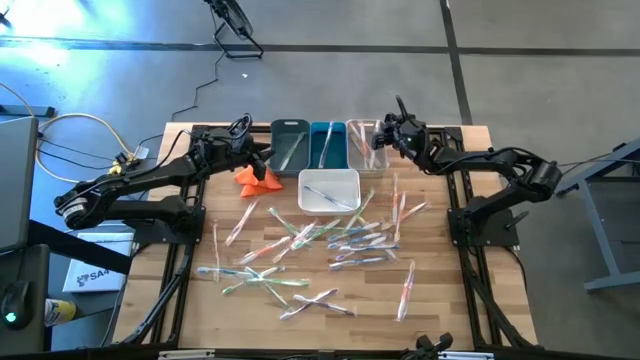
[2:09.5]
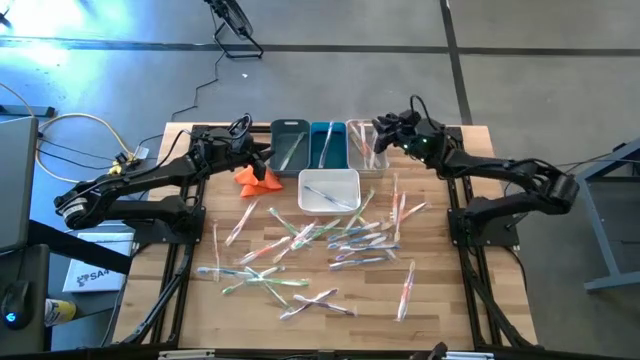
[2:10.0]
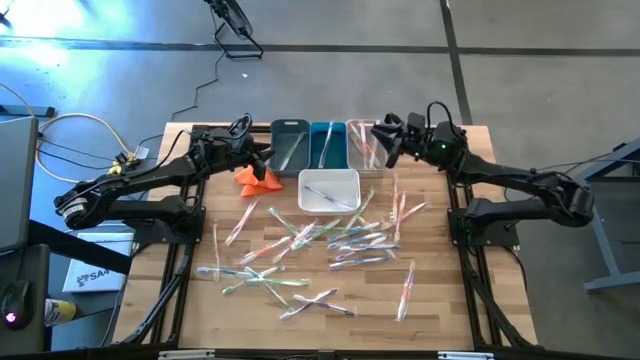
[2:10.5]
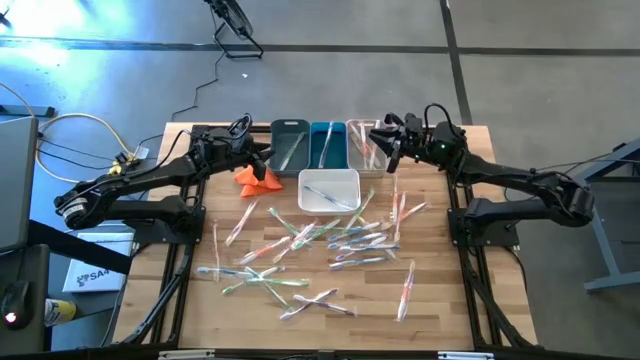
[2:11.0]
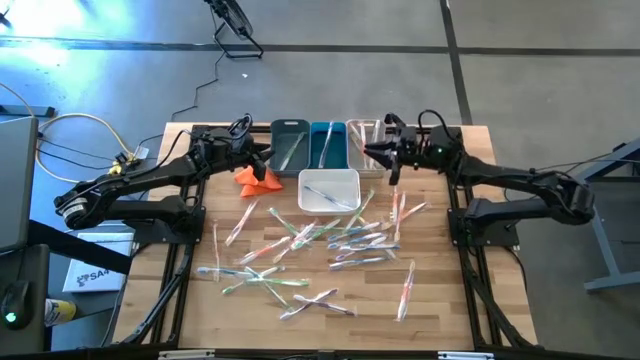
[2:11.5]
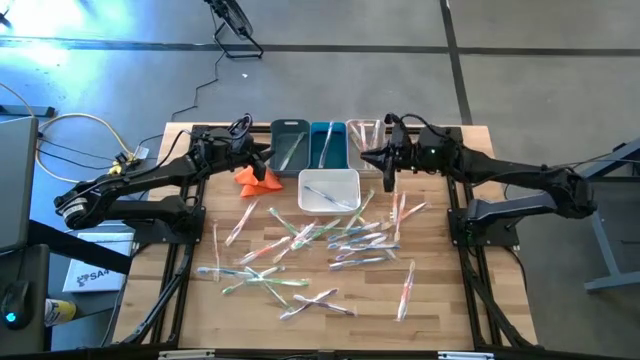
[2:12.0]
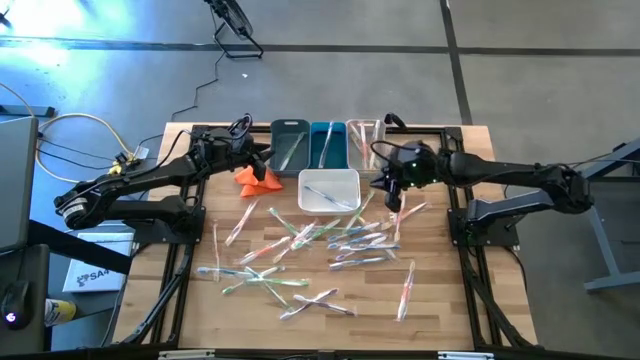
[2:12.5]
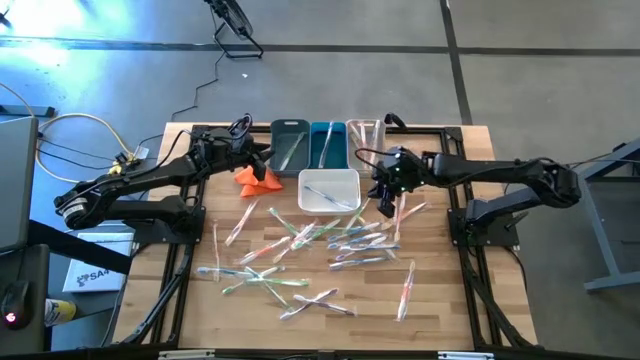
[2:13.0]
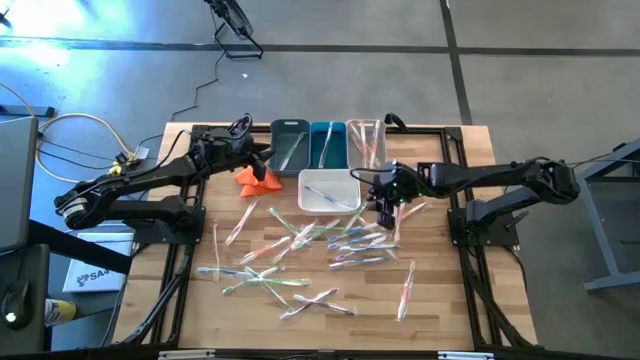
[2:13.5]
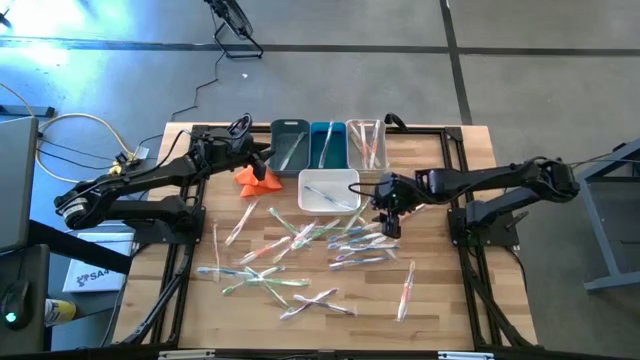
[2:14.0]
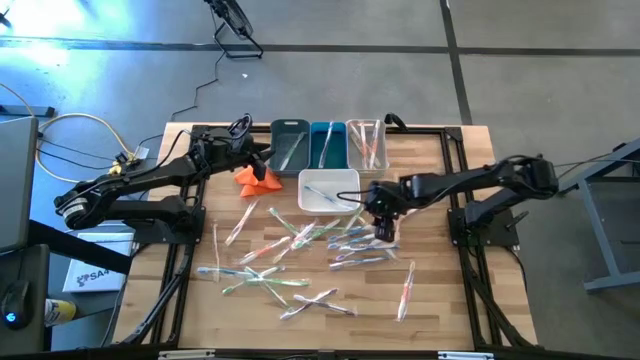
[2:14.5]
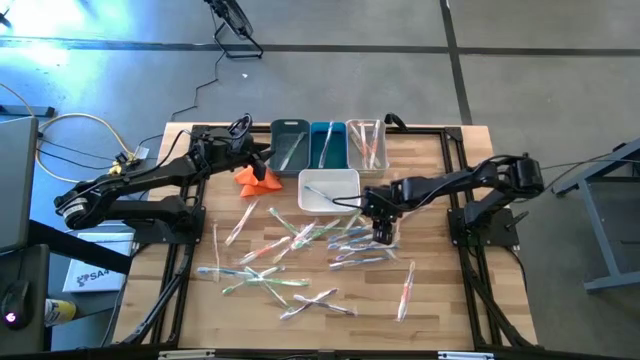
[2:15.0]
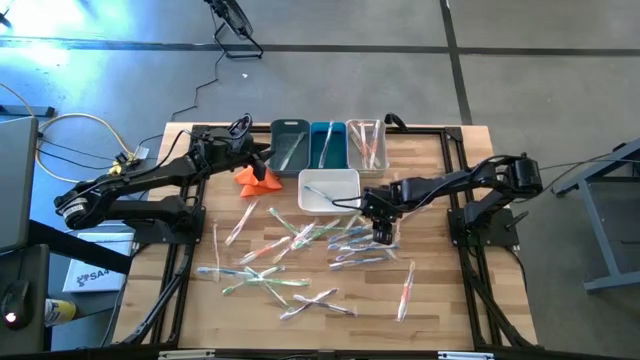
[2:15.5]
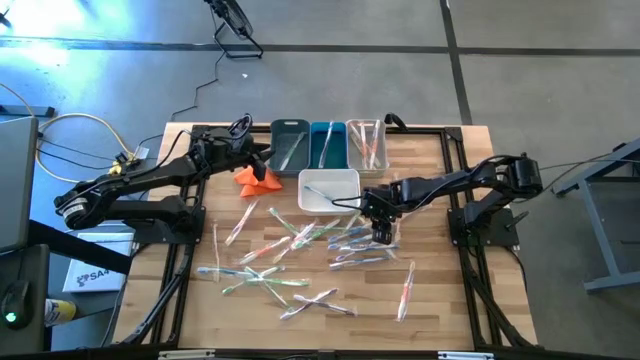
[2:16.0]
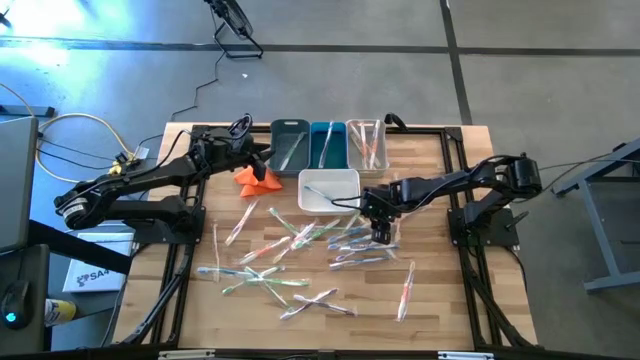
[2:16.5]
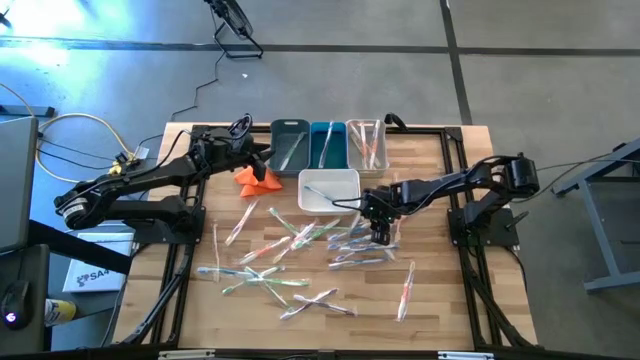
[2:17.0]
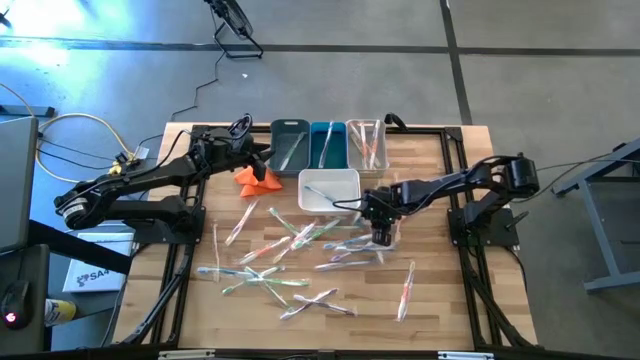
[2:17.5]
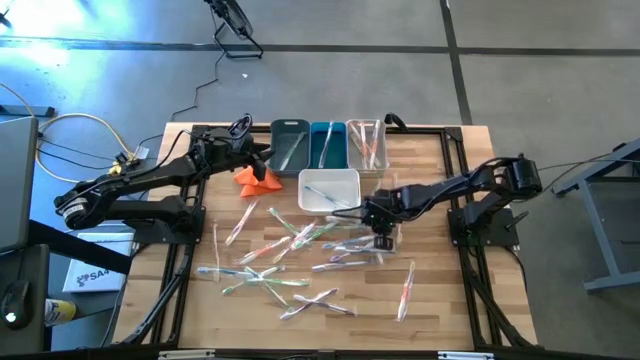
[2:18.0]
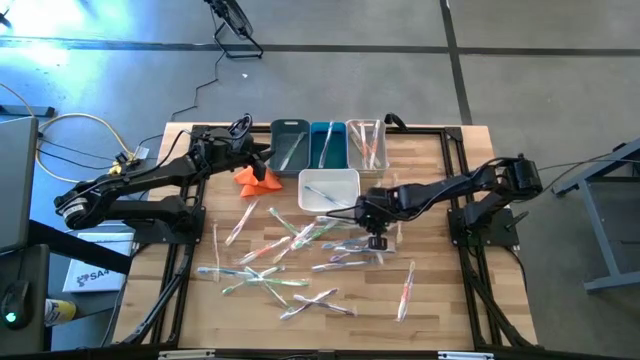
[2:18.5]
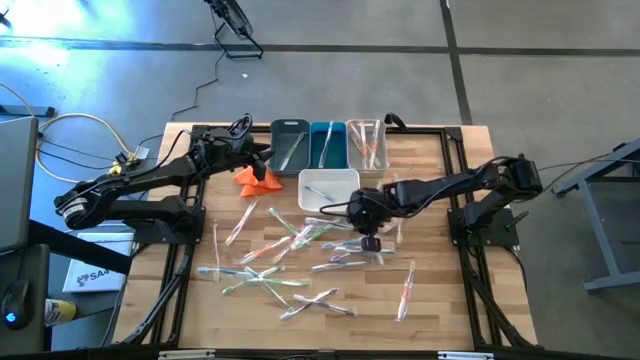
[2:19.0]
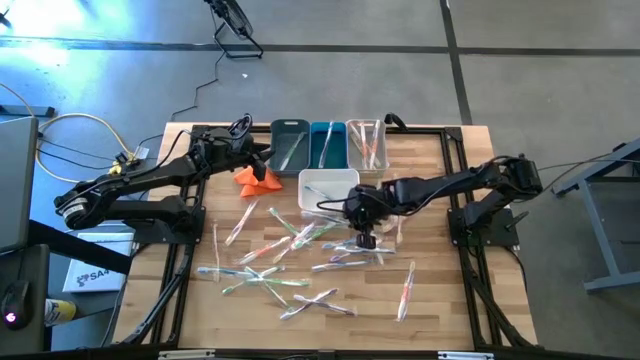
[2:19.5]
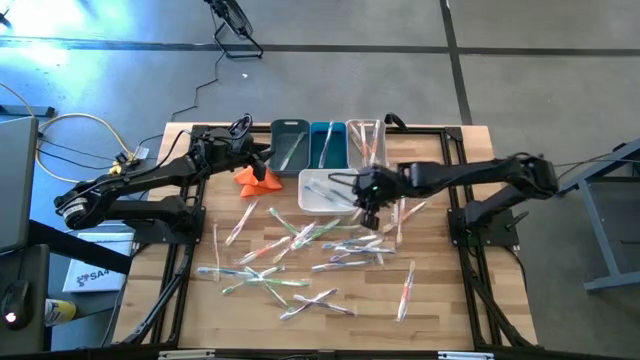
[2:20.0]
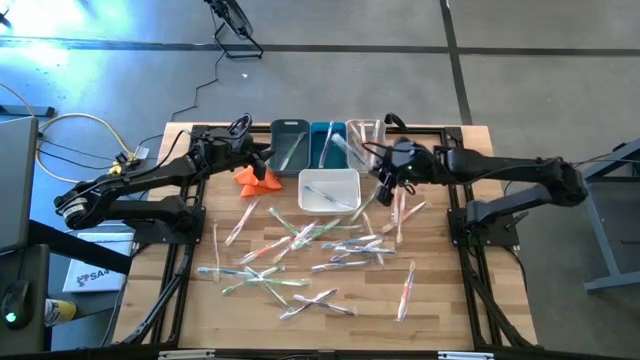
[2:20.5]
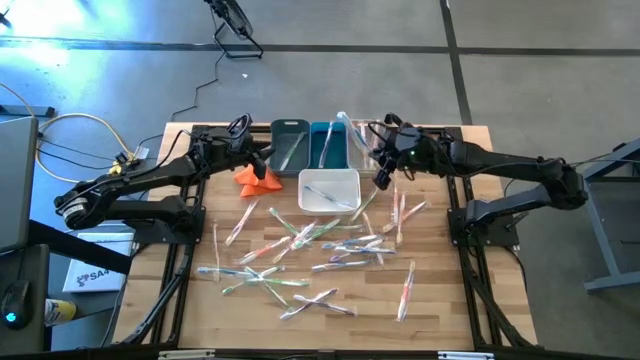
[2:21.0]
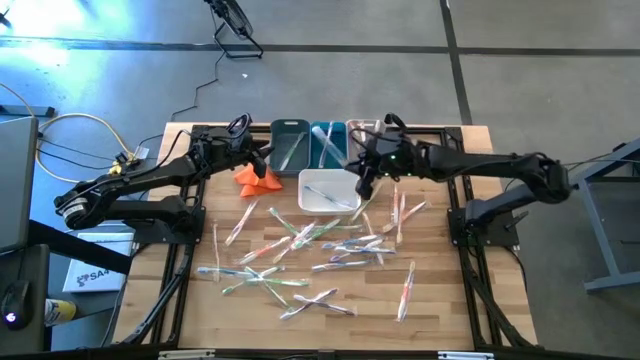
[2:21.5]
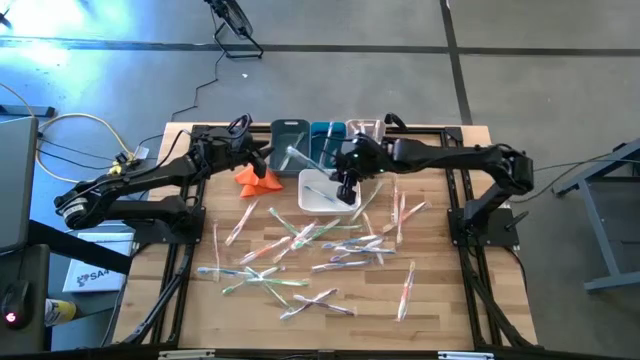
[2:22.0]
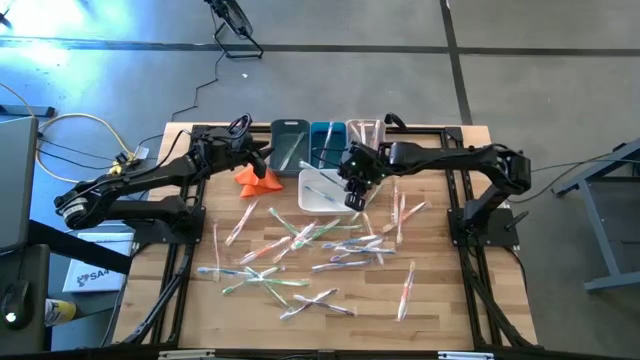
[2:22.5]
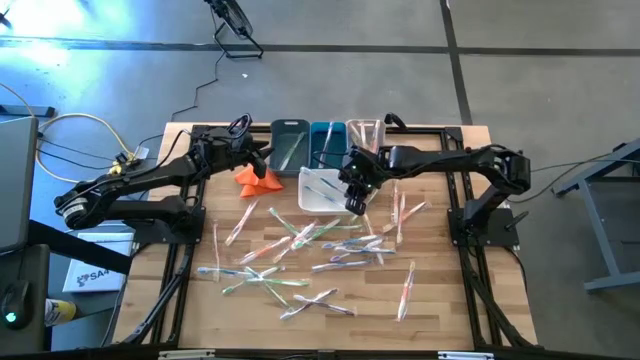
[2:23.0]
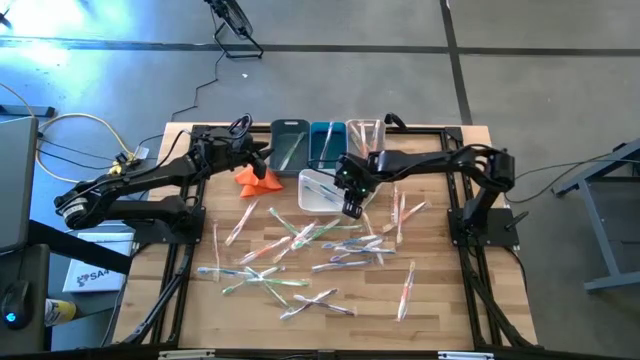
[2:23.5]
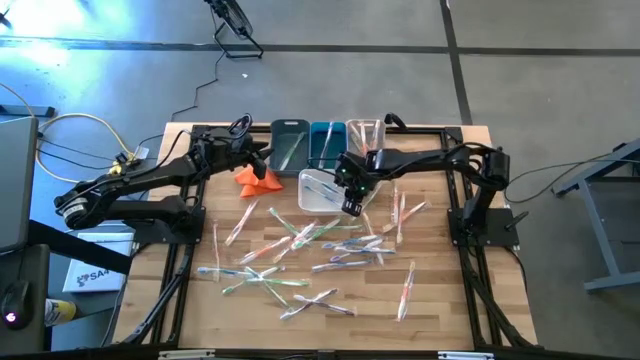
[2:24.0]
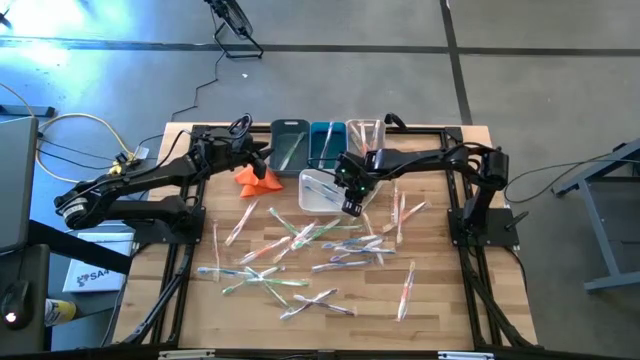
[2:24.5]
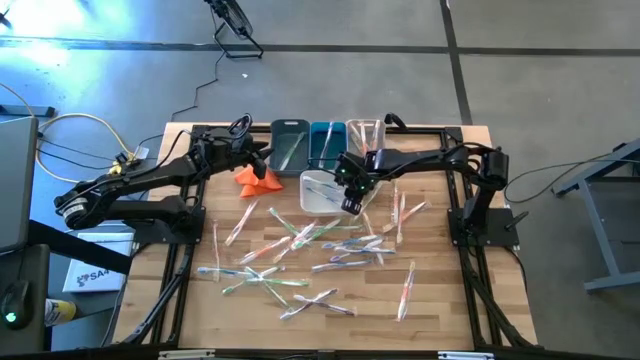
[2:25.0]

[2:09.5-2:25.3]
Task: Pick & Place Toothbrushes
Put the blue toothbrush into the white bin

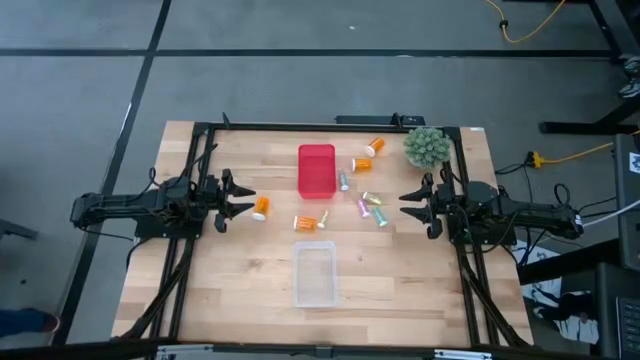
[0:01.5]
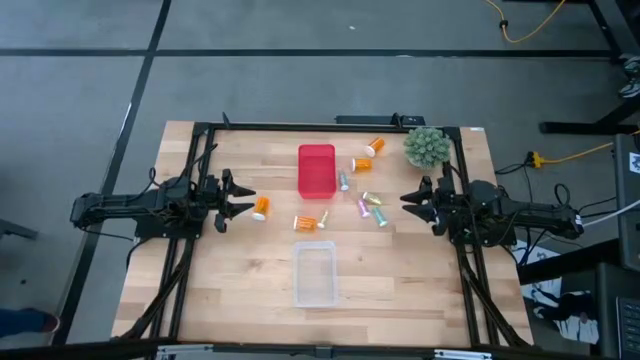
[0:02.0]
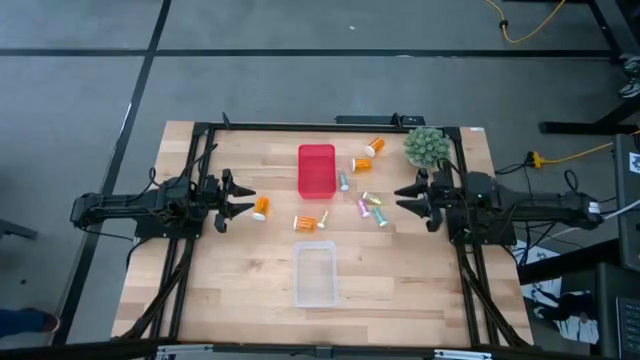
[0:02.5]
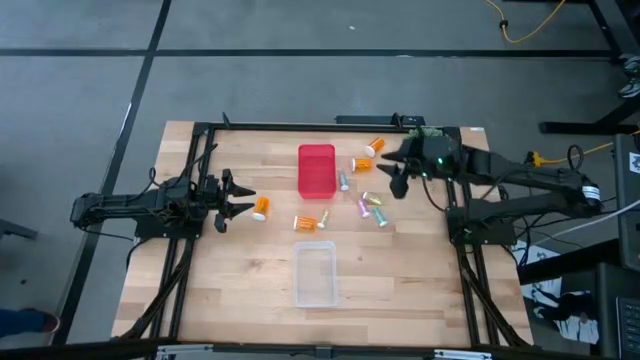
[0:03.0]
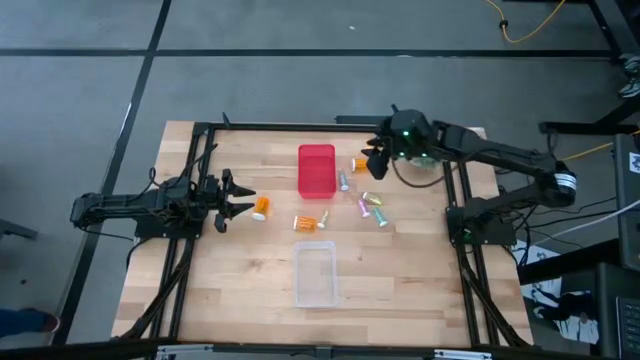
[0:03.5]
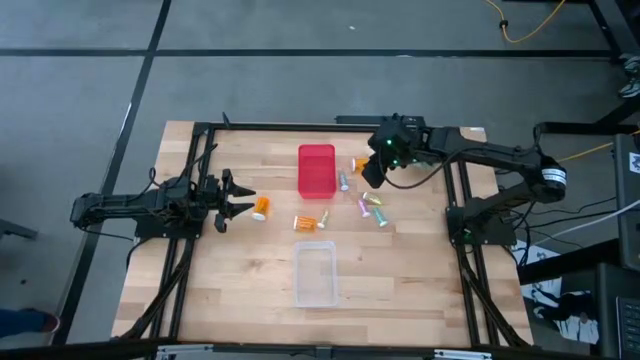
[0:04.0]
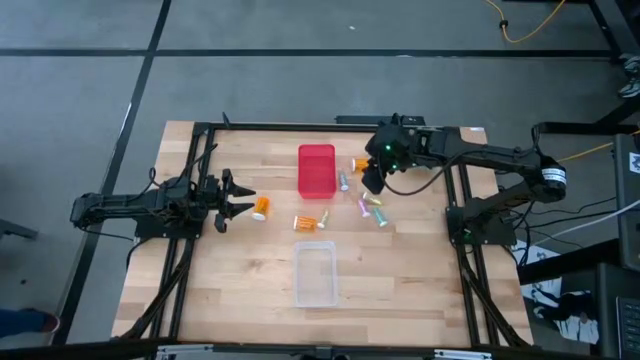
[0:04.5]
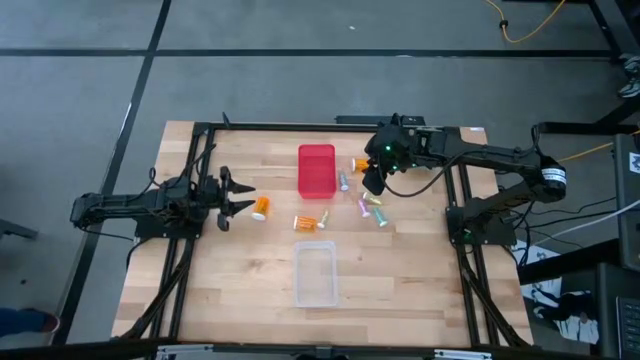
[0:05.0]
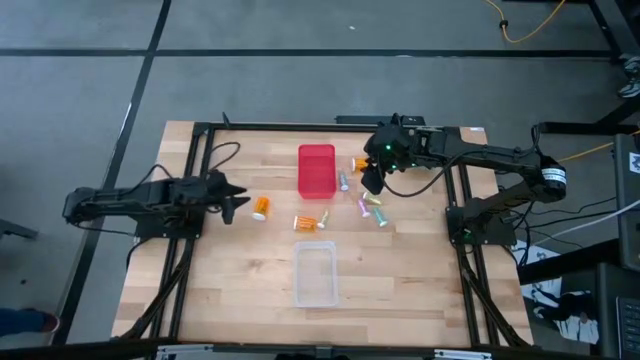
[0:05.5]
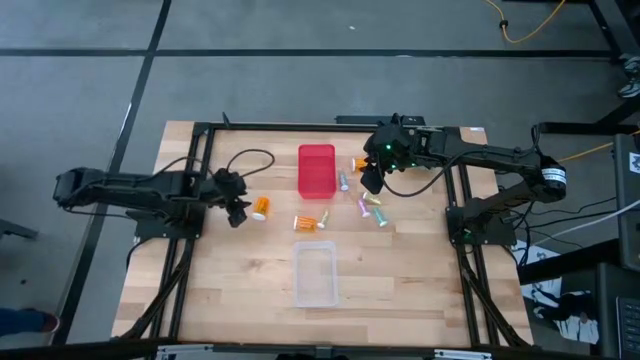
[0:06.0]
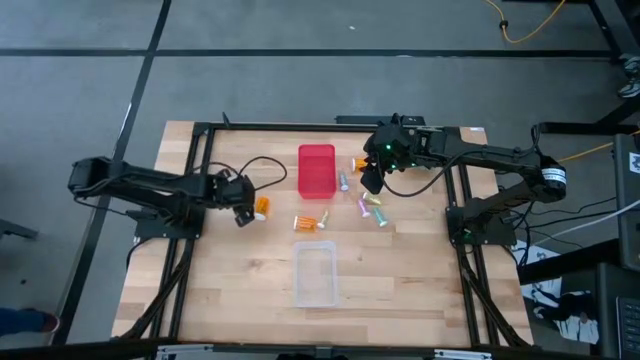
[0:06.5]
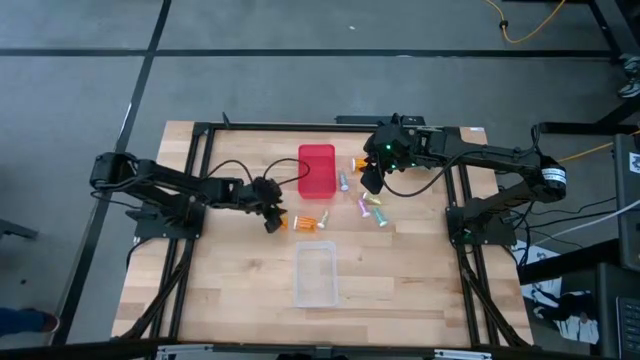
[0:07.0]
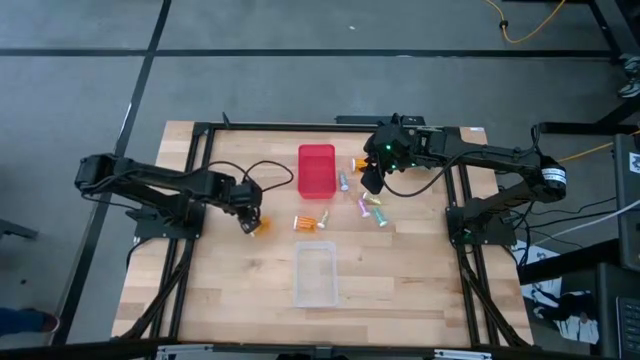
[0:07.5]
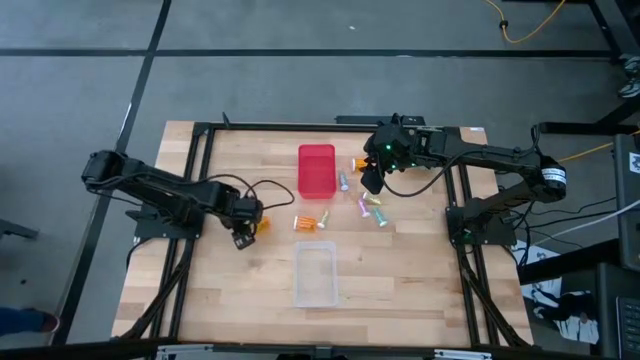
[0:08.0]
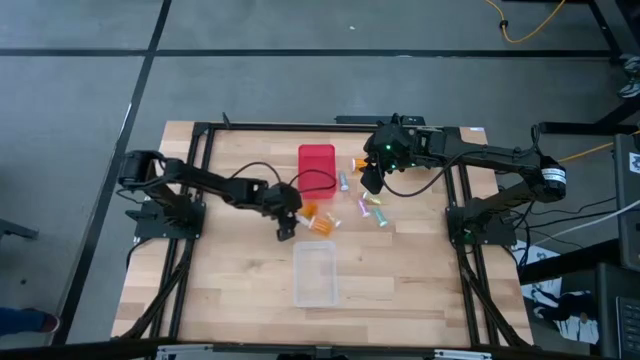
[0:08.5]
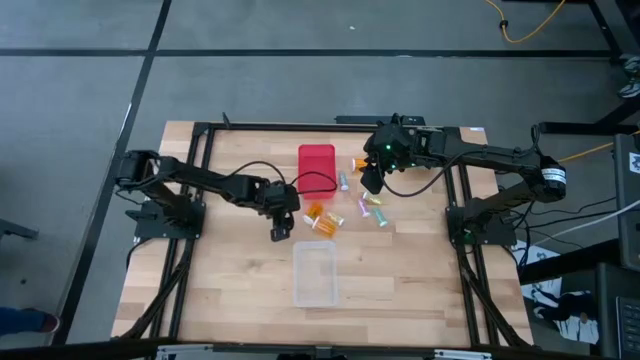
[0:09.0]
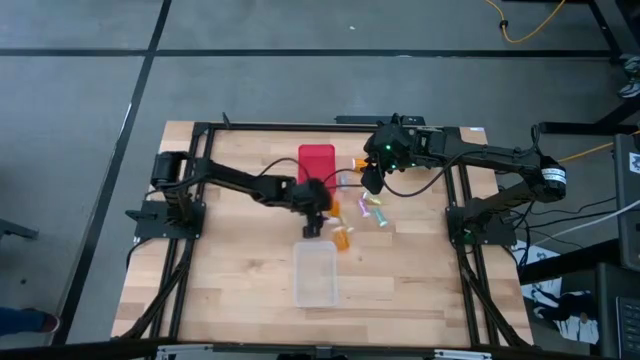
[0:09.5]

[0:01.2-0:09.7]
Task: Pick and place medicine bottles into bin by pill shape (circle, oval)
Move the large orange pill bottles to the center of the table
